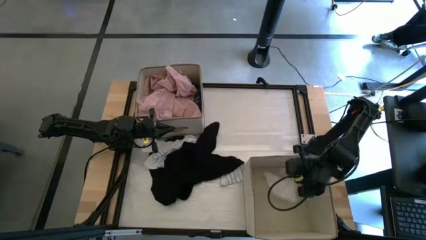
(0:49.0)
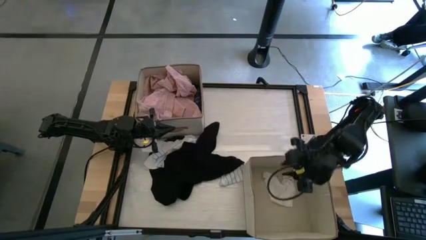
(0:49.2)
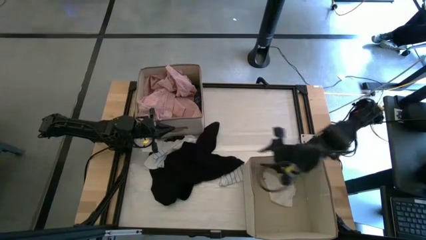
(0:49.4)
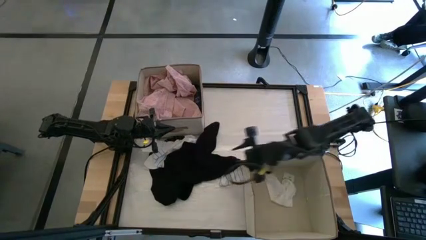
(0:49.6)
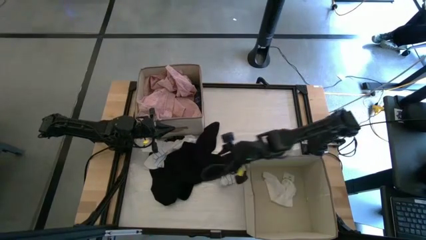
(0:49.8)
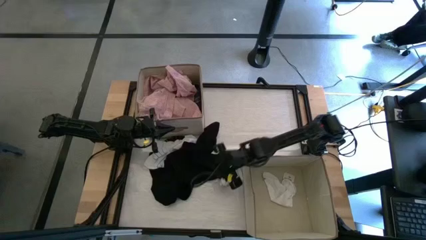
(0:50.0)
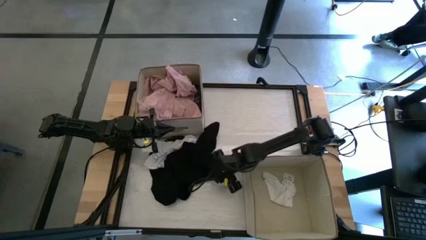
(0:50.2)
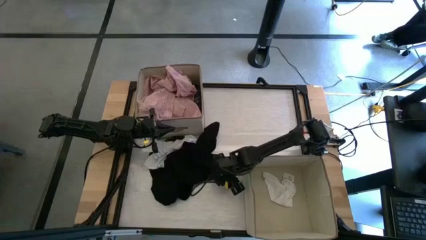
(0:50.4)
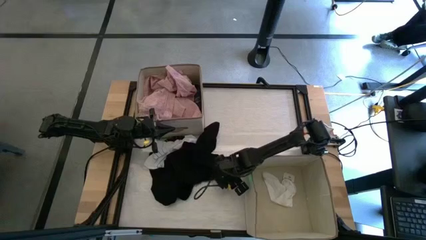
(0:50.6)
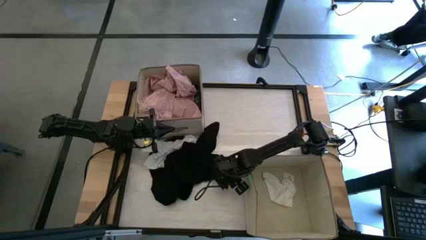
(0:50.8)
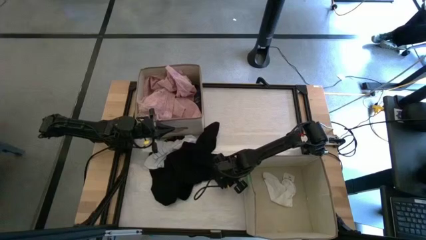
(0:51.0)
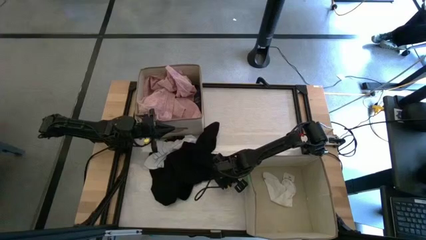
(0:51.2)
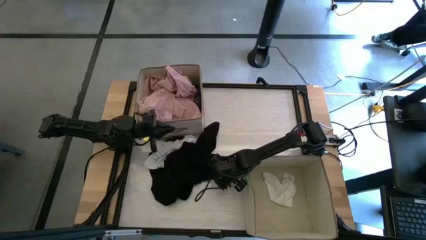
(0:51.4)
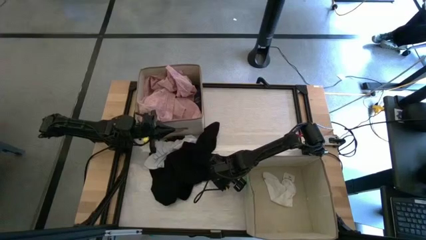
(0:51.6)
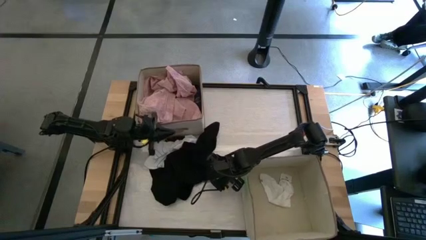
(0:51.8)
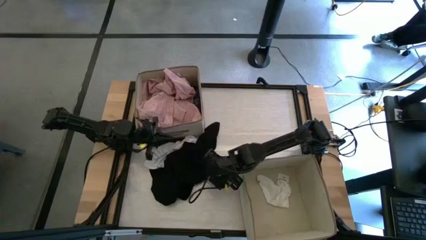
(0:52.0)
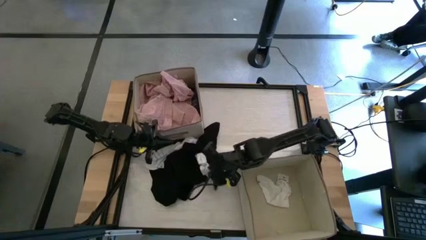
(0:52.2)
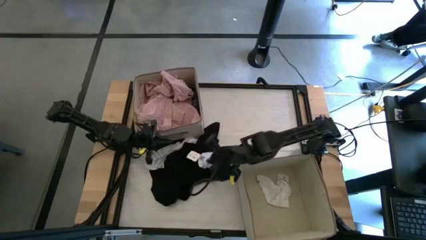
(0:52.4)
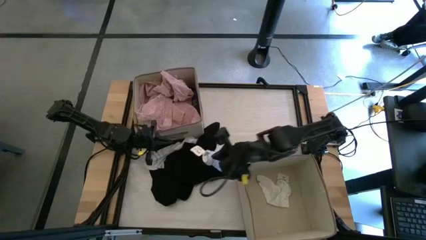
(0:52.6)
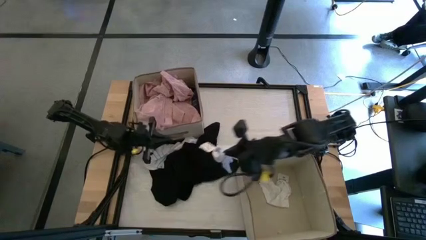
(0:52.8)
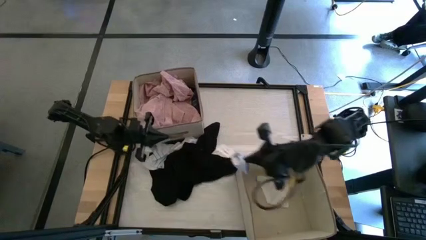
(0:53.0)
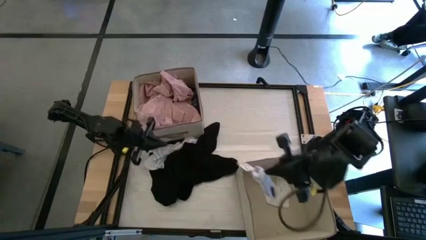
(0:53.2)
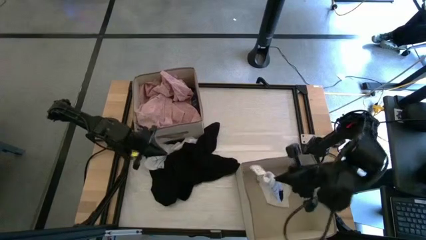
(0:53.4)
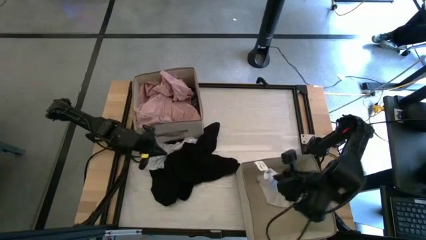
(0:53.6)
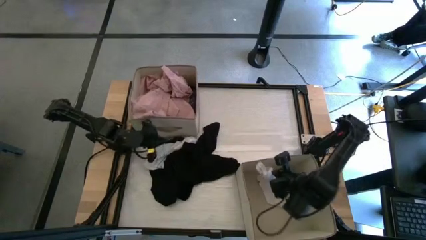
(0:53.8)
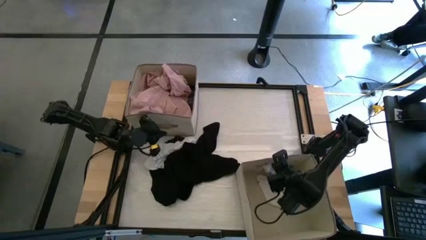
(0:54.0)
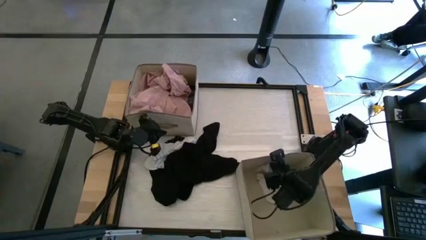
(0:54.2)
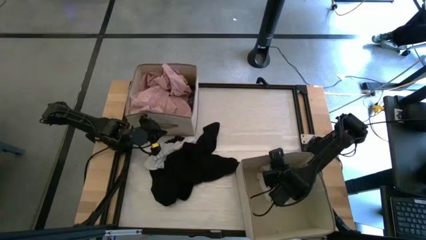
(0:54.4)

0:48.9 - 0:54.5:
Task: Sort clothes
Put the white-blue sock into the bottom white laundry organizer

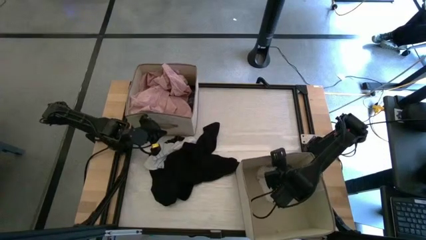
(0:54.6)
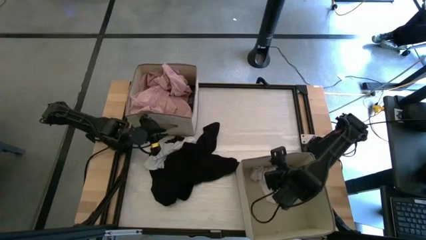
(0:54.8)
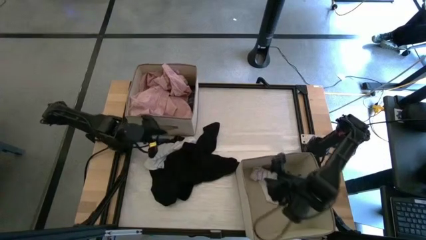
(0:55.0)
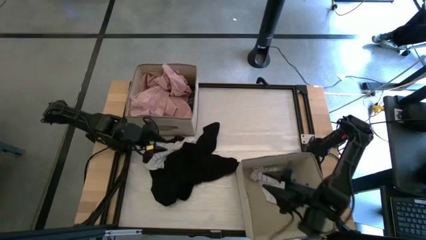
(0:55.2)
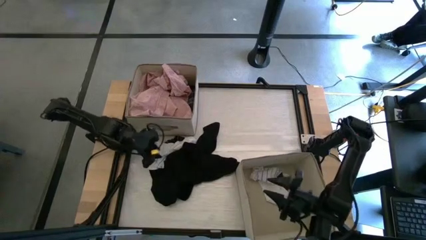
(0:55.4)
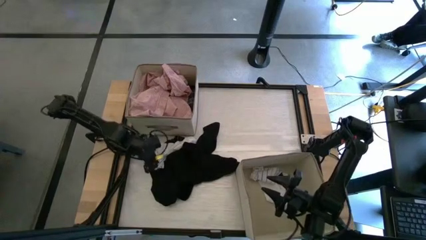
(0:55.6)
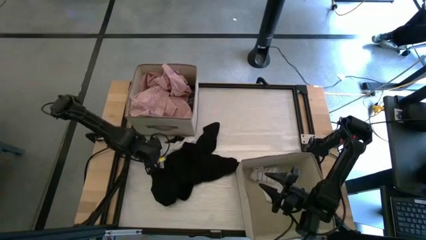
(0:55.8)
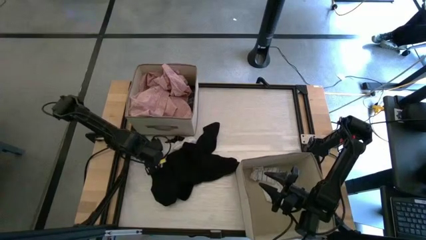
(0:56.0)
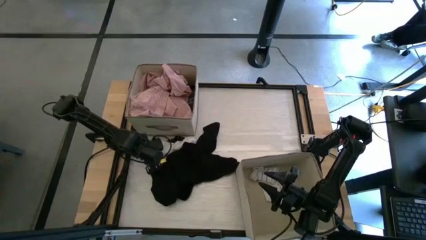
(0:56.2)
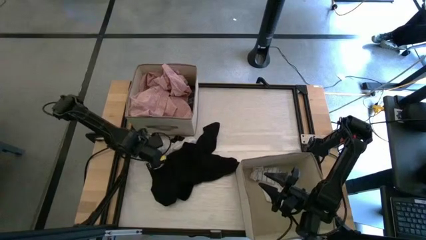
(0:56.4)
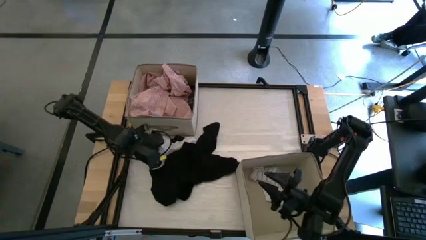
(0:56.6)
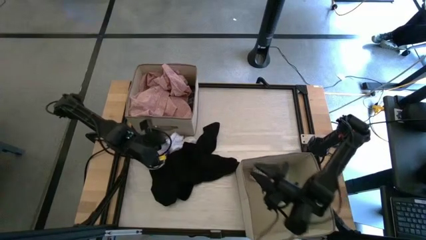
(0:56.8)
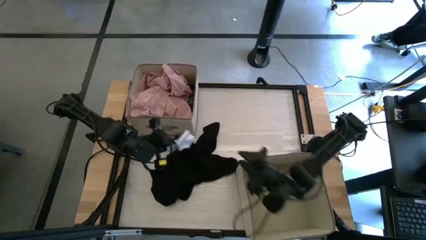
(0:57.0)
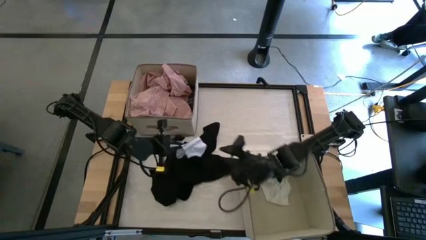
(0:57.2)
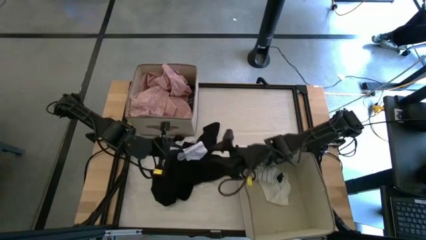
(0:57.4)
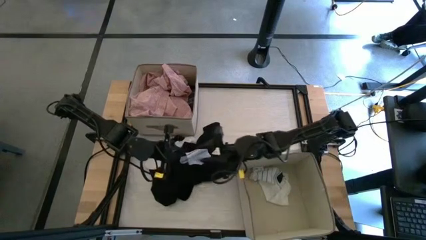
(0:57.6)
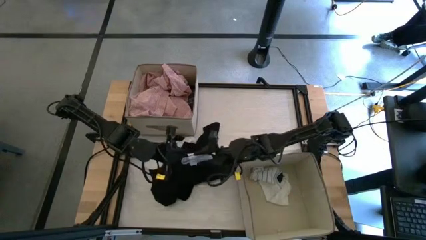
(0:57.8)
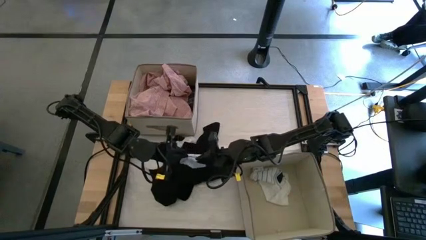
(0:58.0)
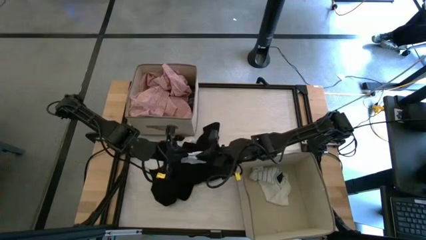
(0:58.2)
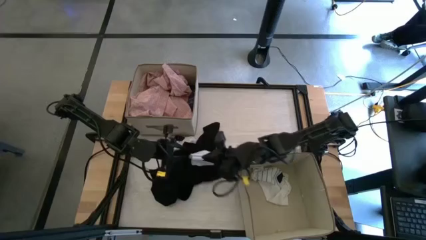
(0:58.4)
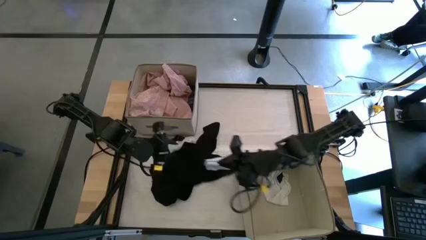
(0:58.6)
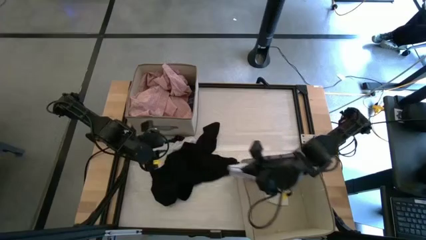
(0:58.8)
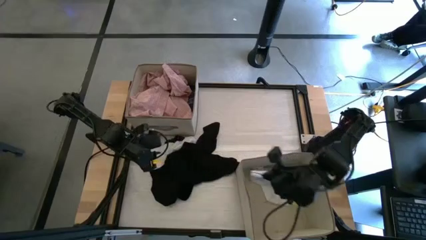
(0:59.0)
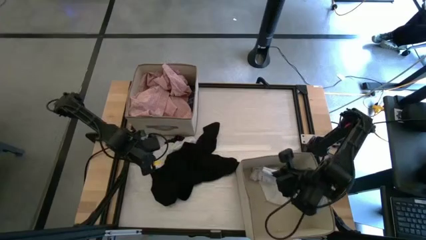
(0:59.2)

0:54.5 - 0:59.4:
Put the white-blue sock into the bottom white laundry organizer

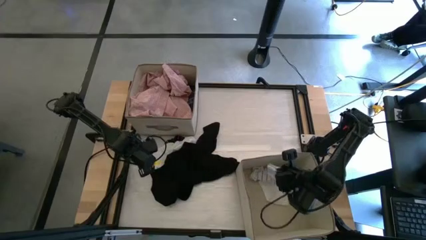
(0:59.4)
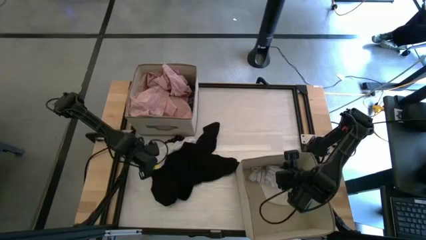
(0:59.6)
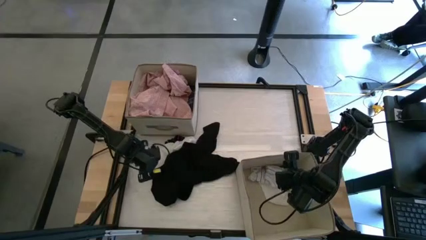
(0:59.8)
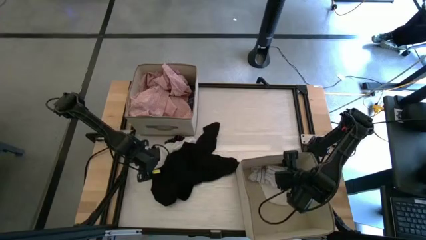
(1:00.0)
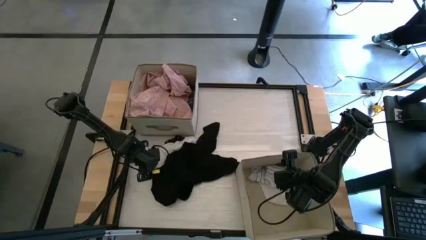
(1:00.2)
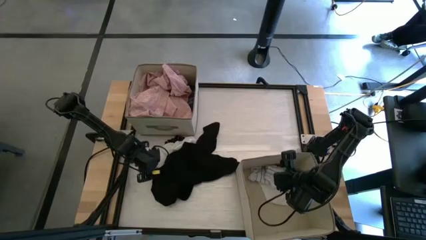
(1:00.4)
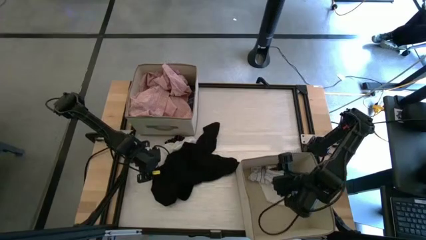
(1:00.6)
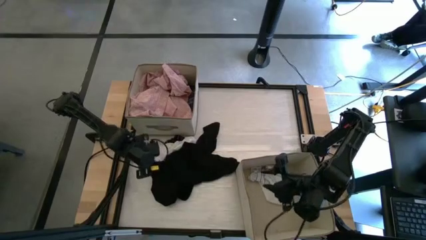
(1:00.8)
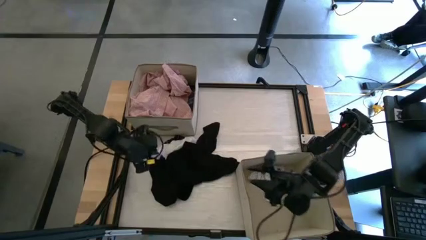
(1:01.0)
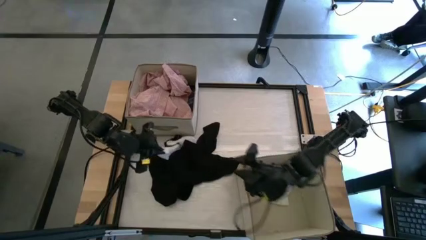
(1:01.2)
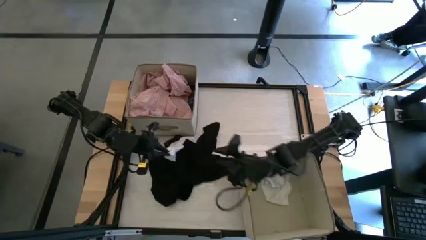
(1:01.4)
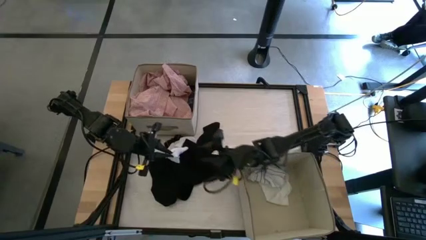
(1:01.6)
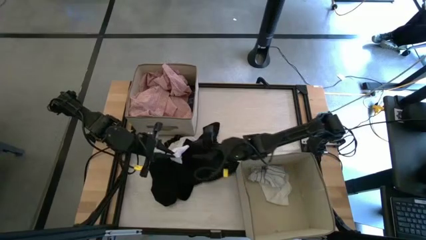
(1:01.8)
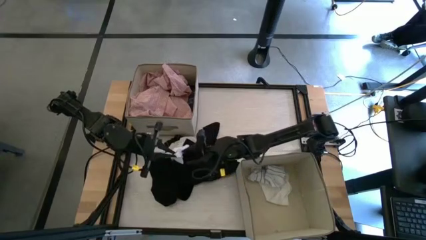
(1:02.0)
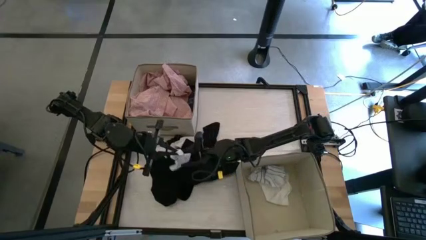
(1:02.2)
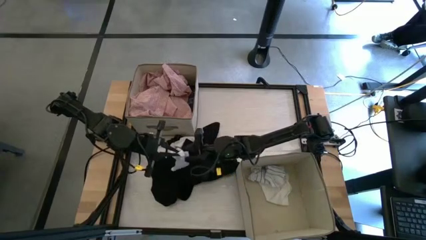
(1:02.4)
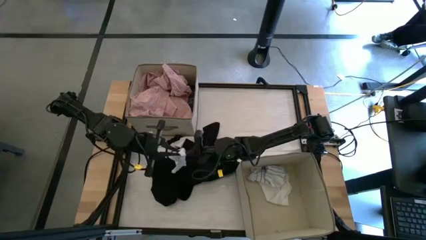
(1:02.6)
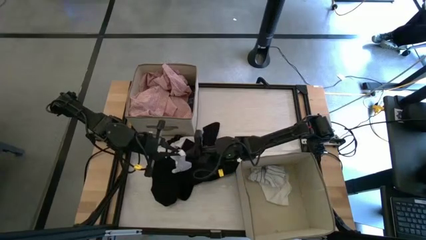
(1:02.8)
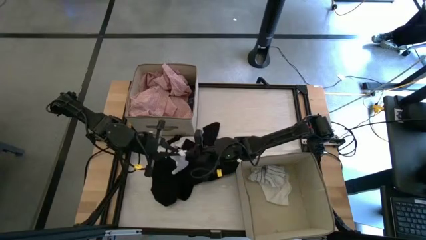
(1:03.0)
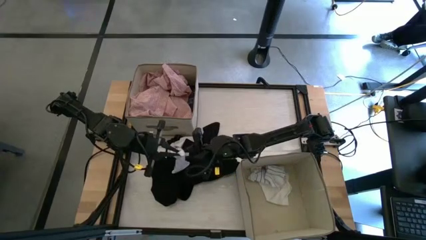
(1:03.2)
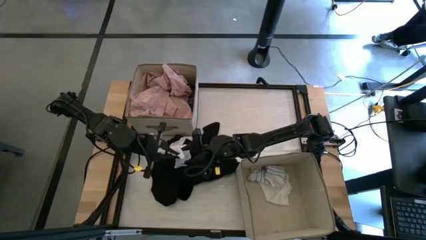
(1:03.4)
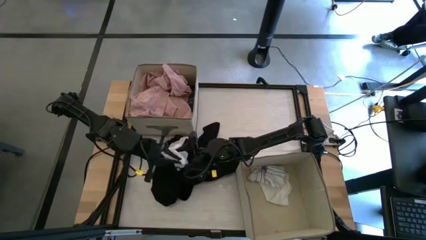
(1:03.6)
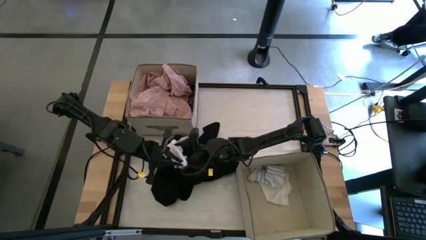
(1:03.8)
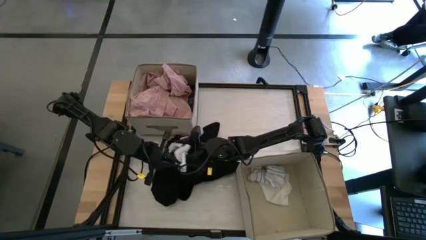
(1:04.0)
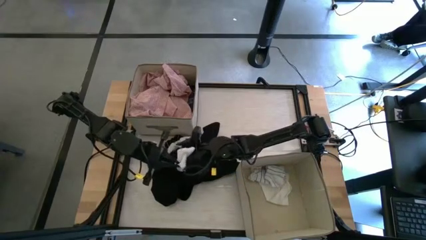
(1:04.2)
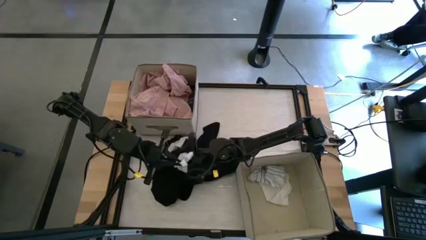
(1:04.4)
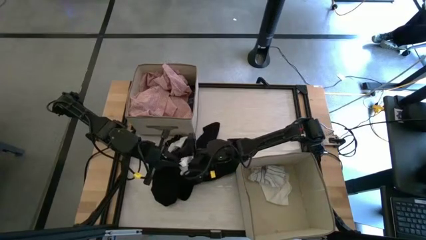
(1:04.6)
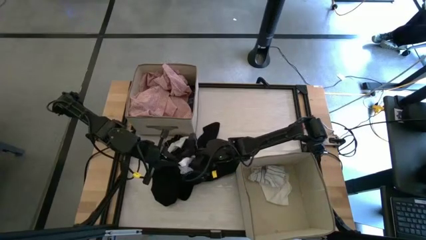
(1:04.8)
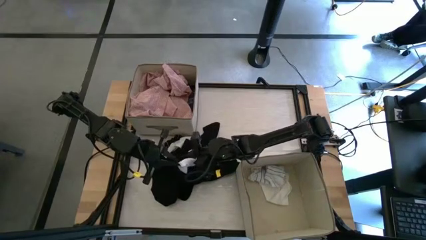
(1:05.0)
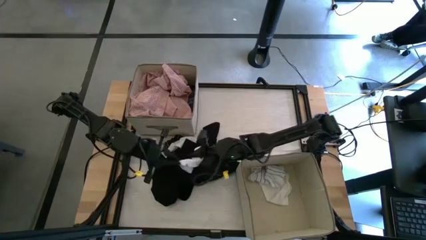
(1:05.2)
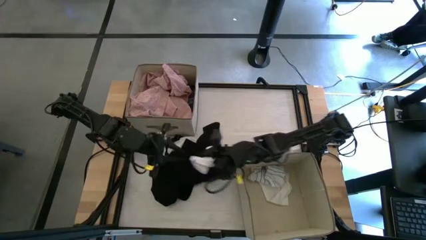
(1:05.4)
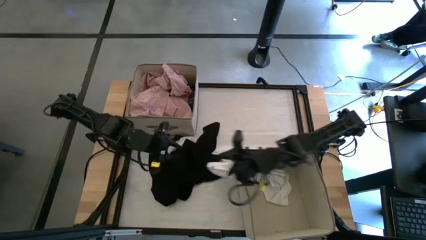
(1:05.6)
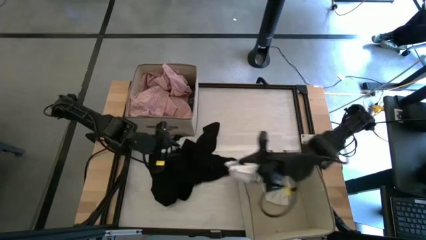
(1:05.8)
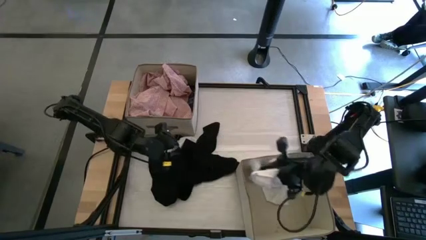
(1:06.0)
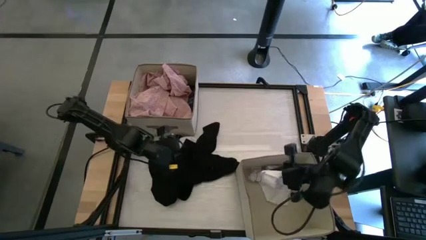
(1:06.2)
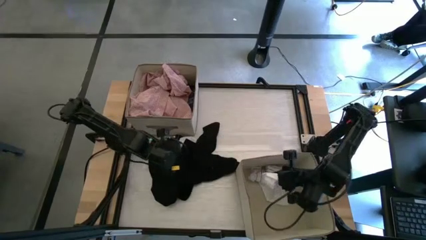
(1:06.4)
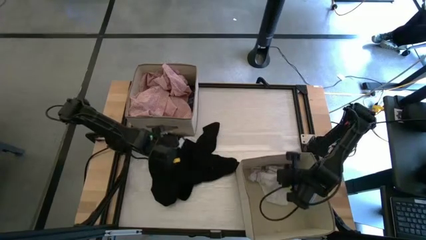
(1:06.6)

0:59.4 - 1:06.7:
Put the white sock into the bottom white laundry organizer
